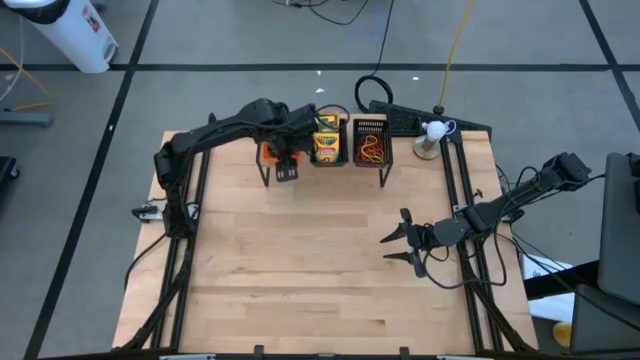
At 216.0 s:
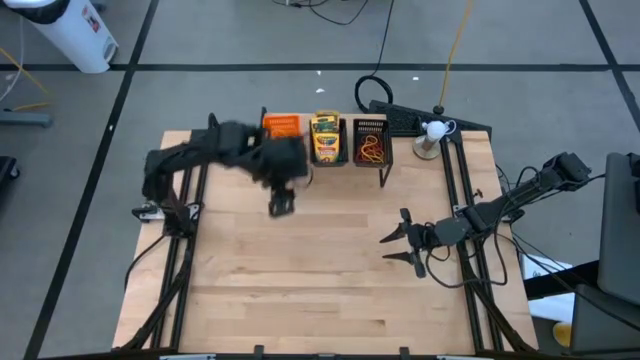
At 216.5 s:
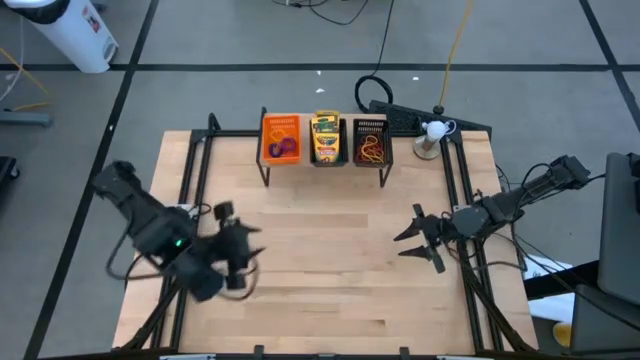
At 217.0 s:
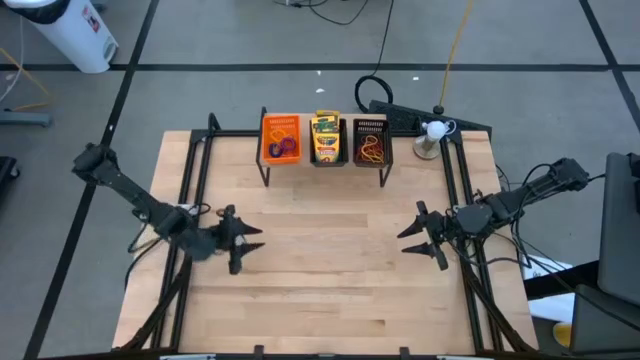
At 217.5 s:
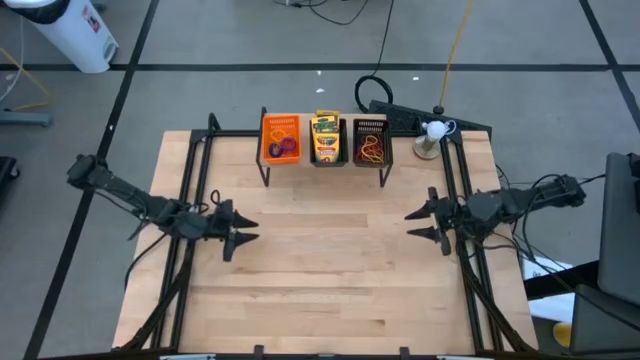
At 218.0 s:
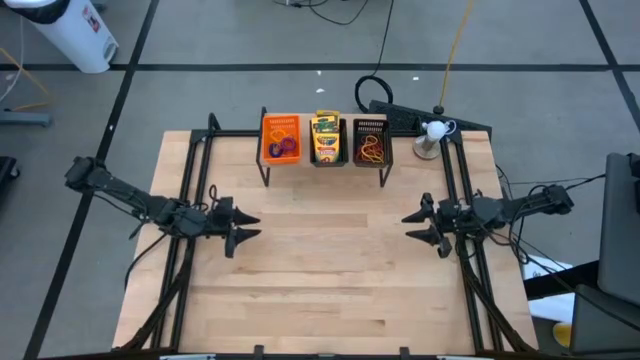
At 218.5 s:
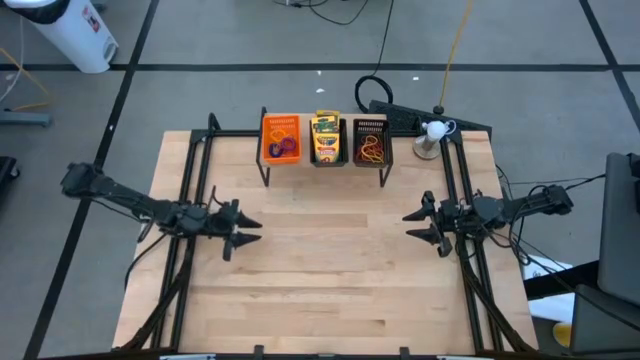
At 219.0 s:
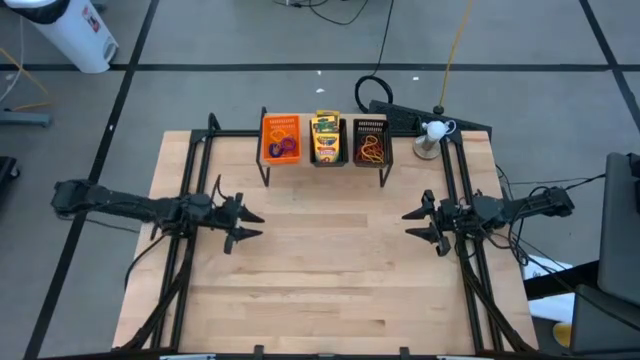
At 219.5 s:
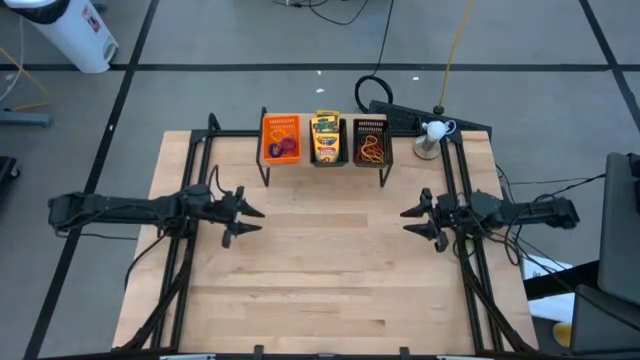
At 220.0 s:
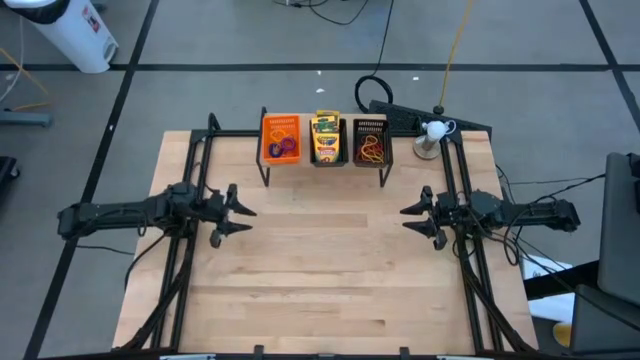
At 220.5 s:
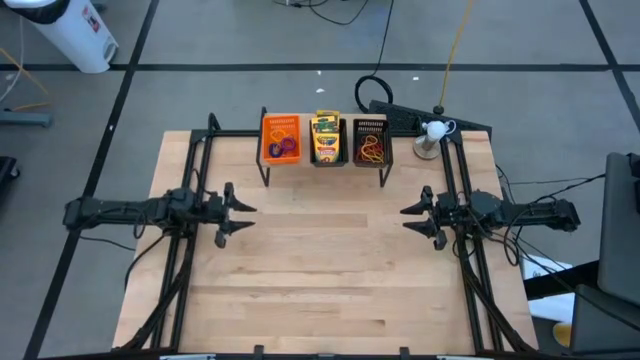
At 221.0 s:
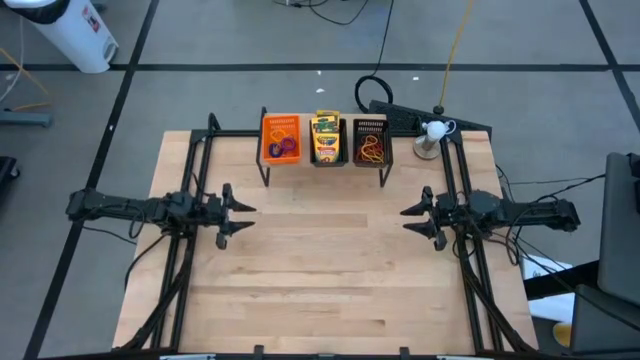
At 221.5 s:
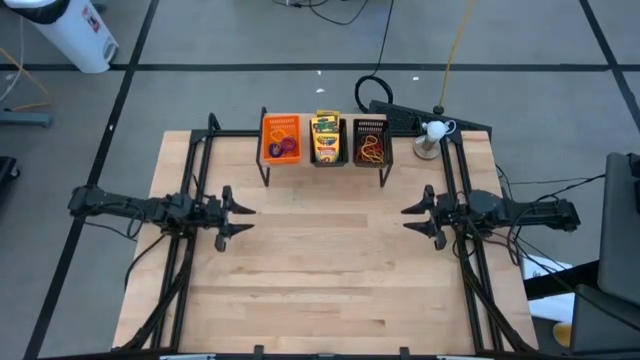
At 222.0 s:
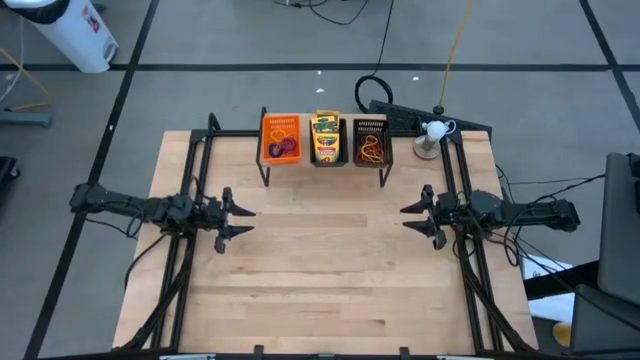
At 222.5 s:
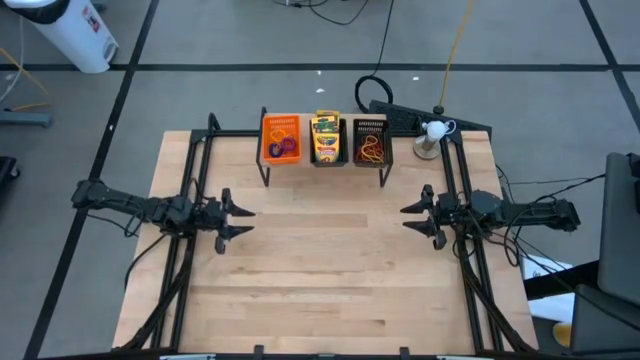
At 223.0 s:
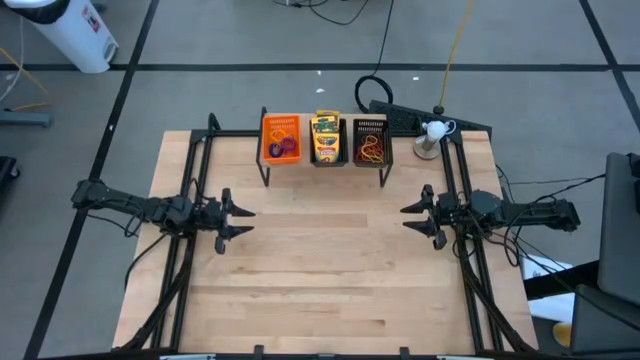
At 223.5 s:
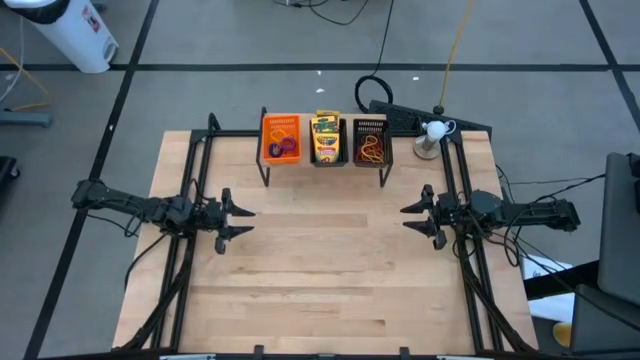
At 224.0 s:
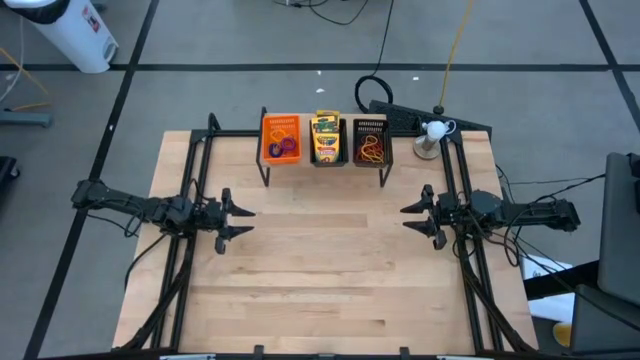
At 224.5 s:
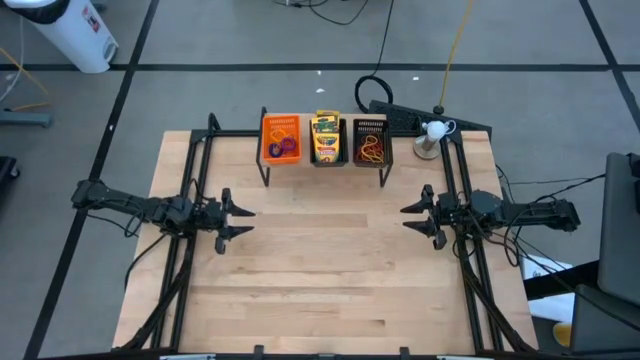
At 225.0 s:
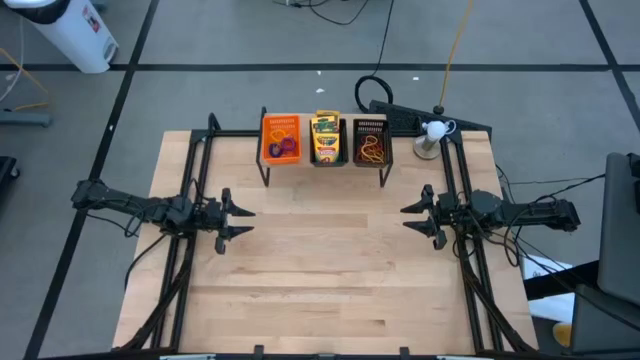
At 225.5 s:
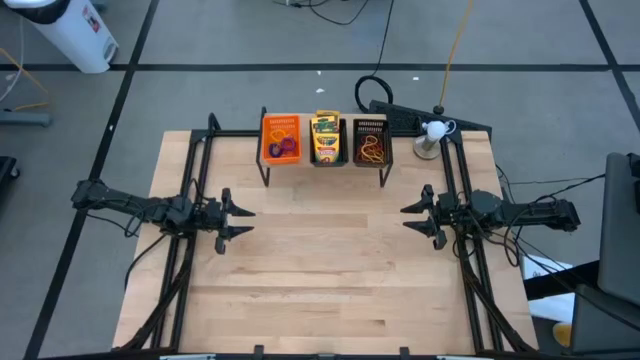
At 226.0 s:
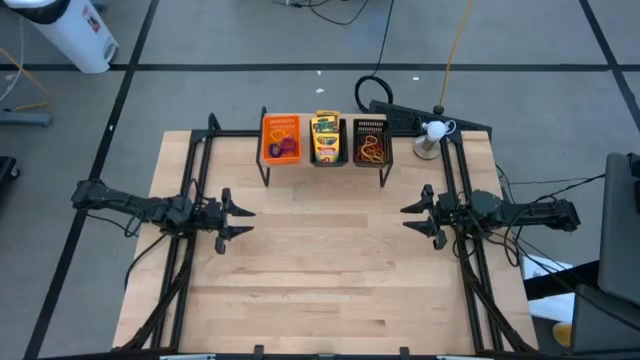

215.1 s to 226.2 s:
Task: Pick & Place Office Desk Supplies
Return to Home Position
